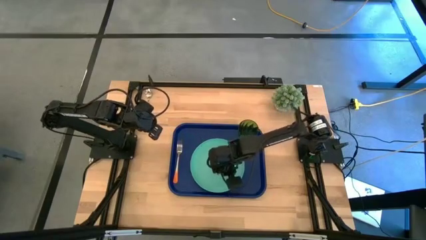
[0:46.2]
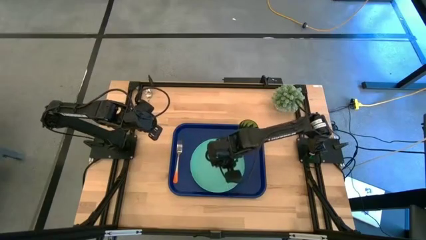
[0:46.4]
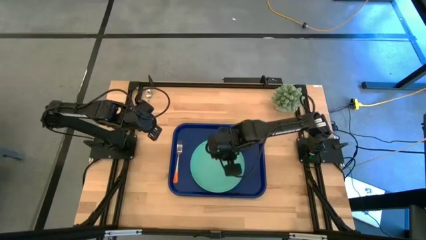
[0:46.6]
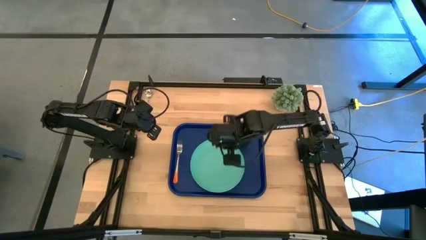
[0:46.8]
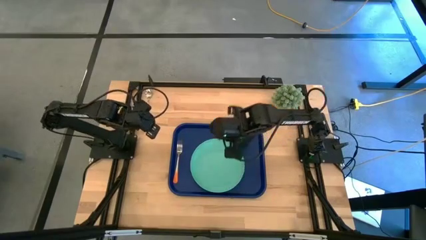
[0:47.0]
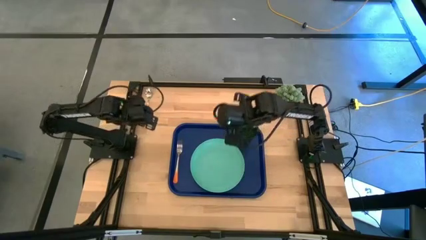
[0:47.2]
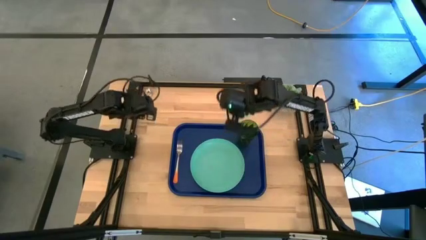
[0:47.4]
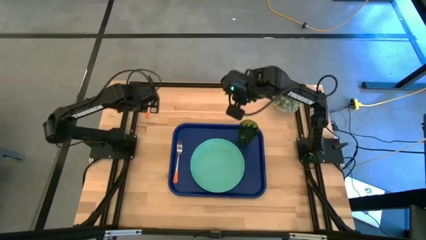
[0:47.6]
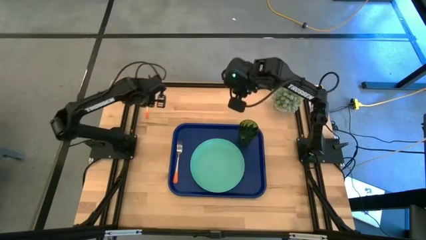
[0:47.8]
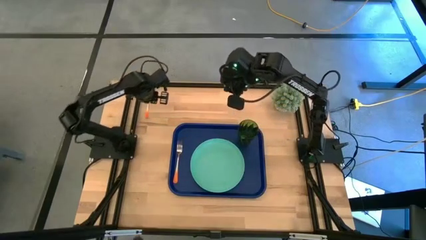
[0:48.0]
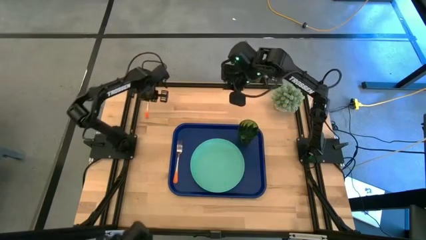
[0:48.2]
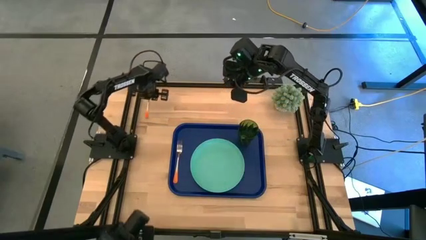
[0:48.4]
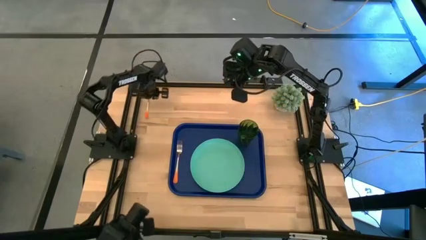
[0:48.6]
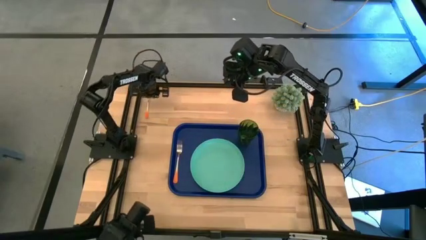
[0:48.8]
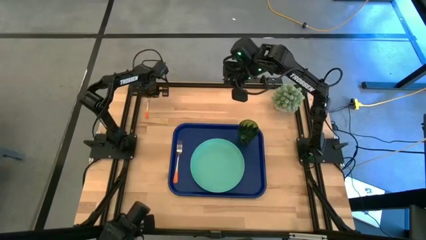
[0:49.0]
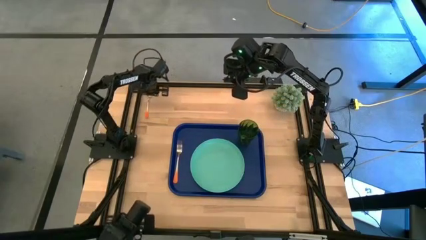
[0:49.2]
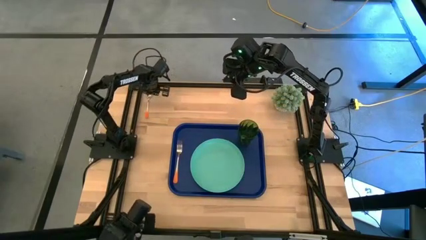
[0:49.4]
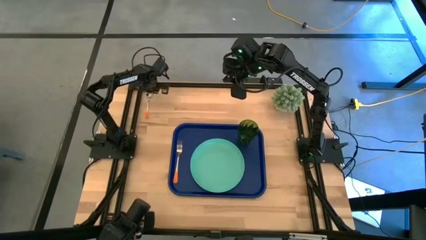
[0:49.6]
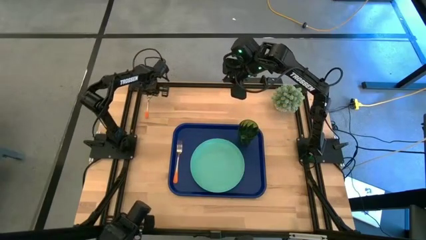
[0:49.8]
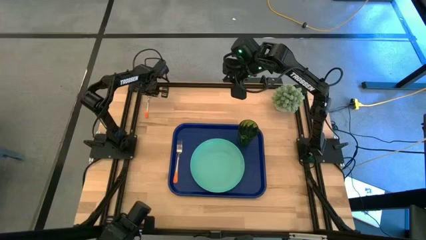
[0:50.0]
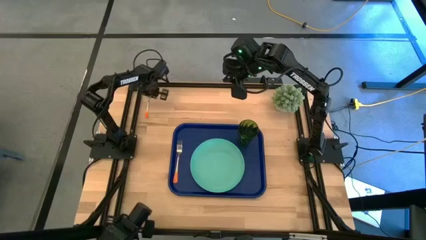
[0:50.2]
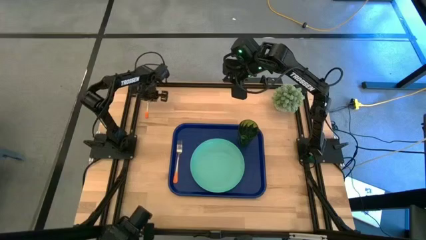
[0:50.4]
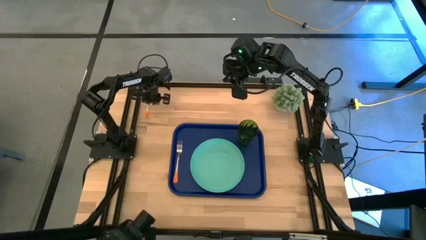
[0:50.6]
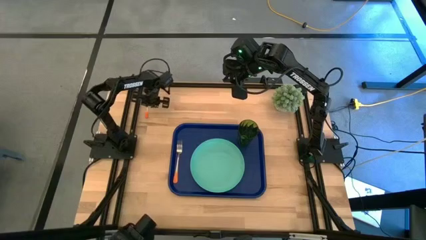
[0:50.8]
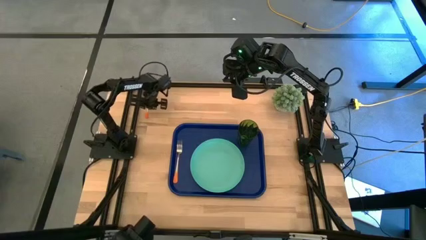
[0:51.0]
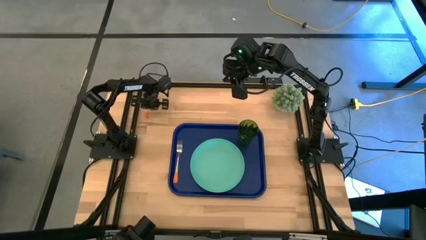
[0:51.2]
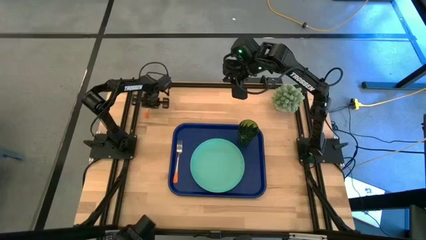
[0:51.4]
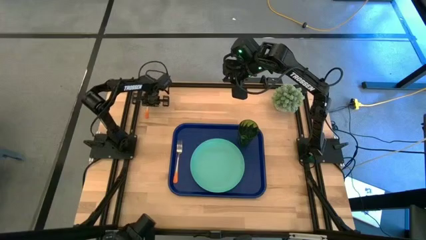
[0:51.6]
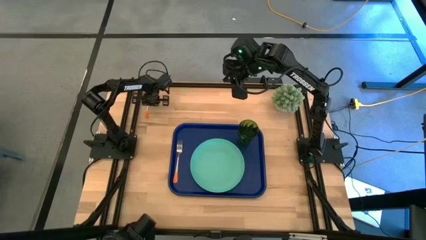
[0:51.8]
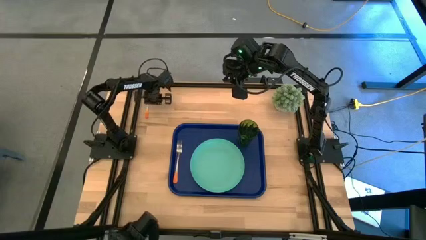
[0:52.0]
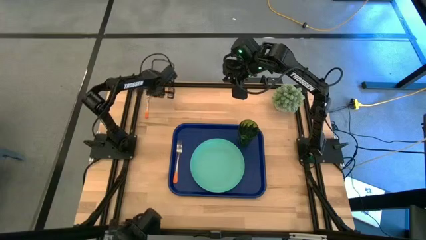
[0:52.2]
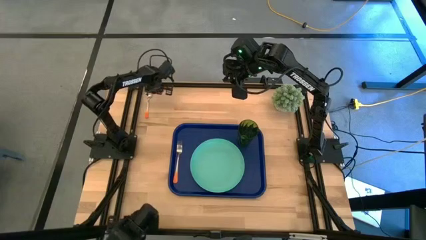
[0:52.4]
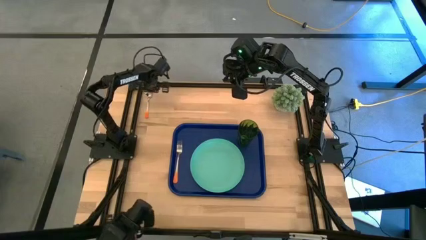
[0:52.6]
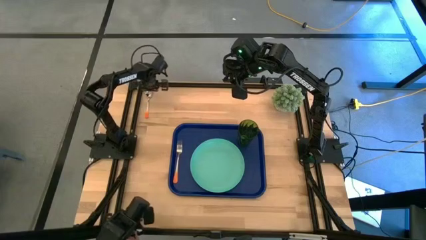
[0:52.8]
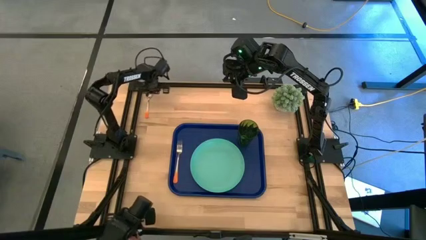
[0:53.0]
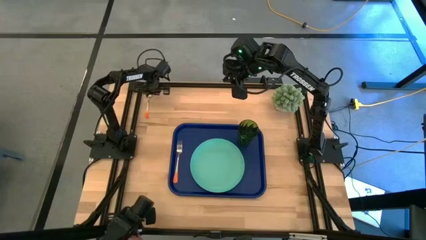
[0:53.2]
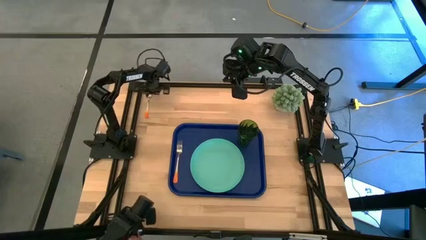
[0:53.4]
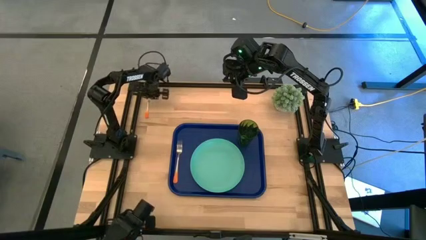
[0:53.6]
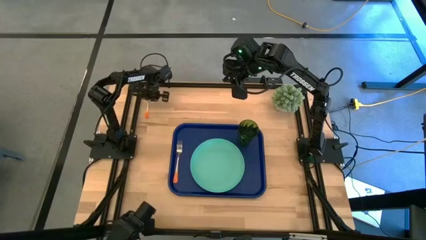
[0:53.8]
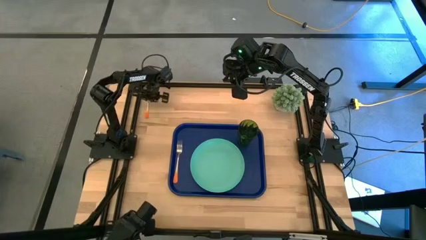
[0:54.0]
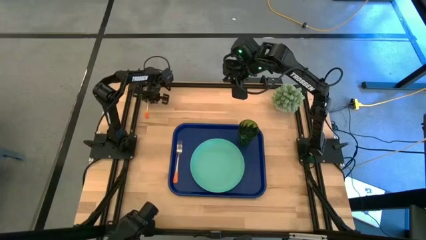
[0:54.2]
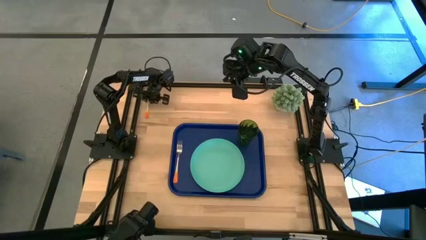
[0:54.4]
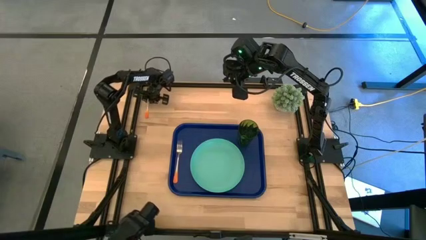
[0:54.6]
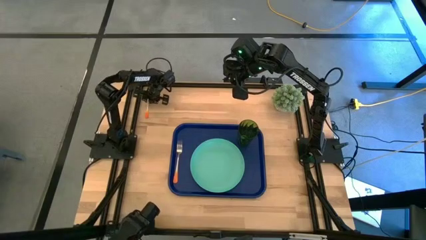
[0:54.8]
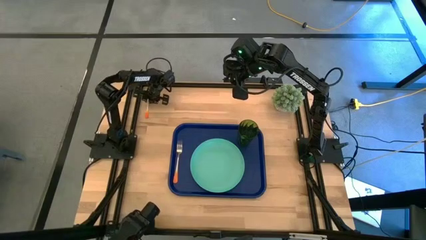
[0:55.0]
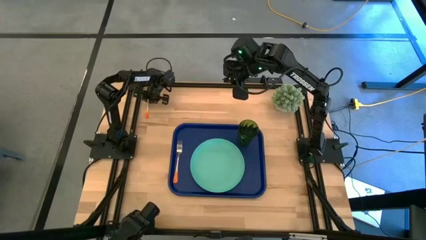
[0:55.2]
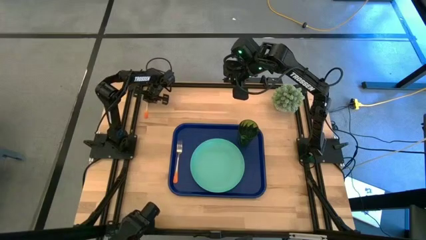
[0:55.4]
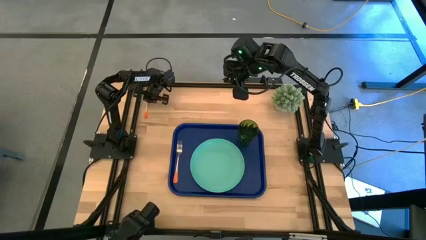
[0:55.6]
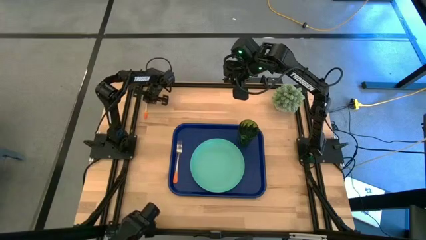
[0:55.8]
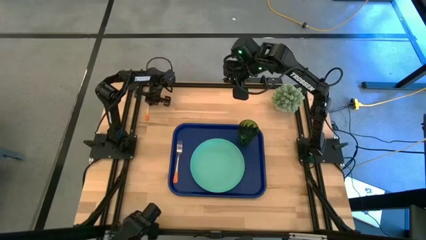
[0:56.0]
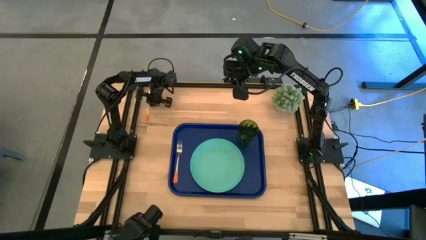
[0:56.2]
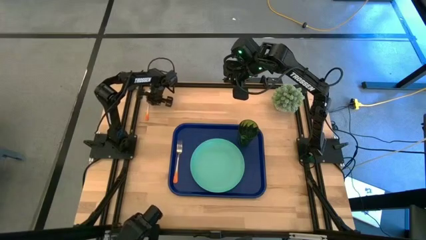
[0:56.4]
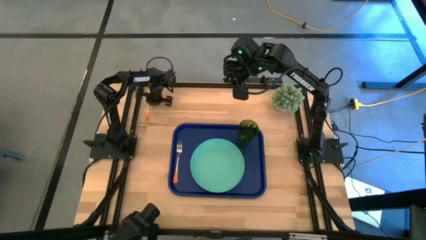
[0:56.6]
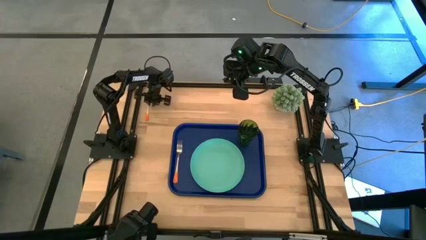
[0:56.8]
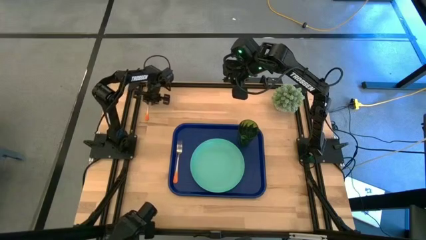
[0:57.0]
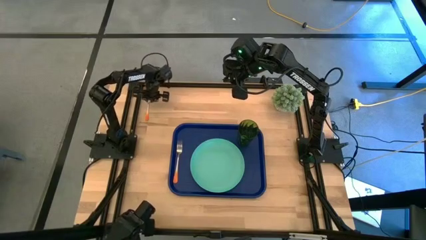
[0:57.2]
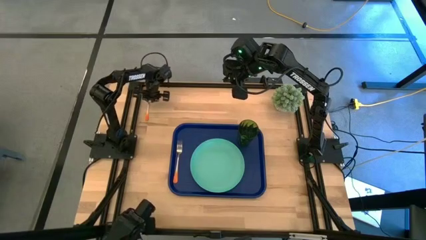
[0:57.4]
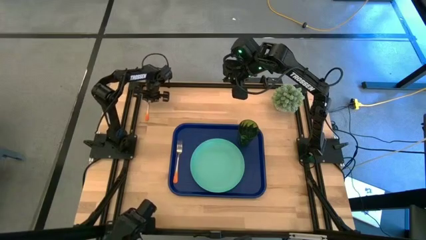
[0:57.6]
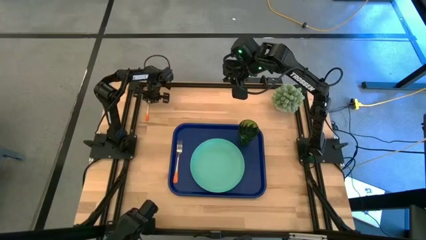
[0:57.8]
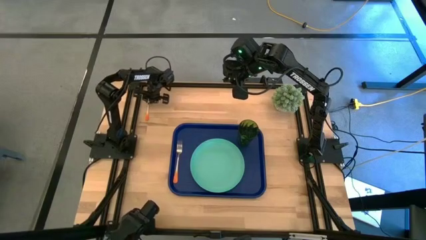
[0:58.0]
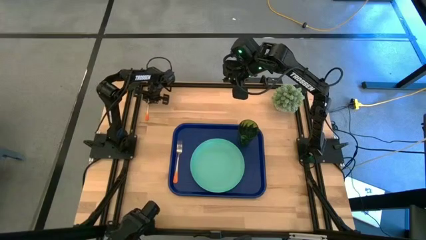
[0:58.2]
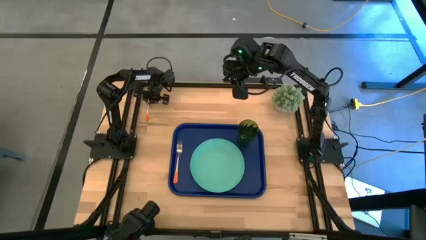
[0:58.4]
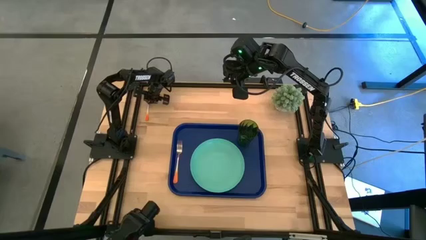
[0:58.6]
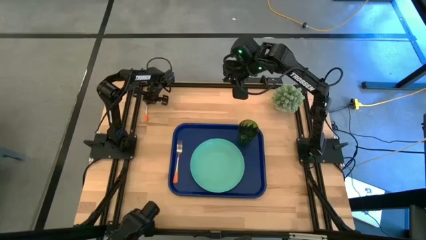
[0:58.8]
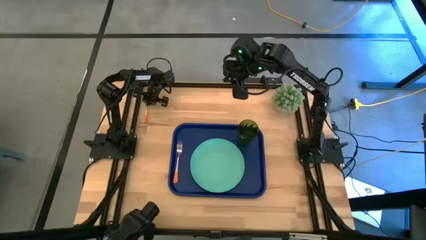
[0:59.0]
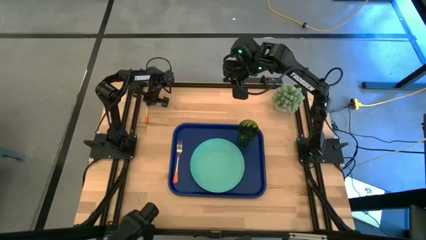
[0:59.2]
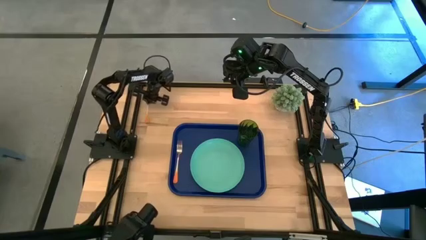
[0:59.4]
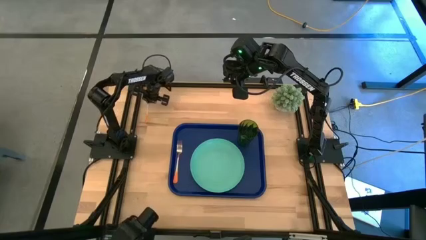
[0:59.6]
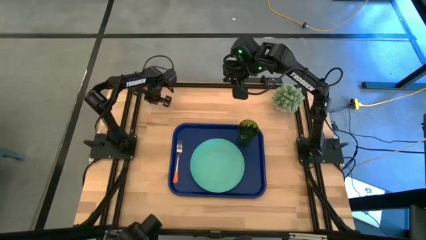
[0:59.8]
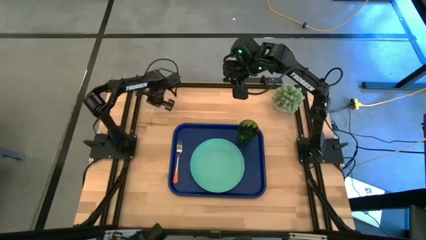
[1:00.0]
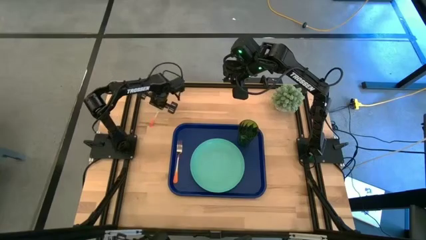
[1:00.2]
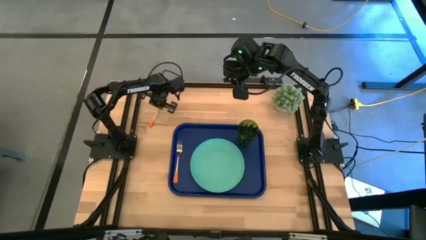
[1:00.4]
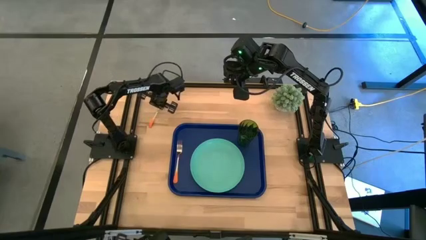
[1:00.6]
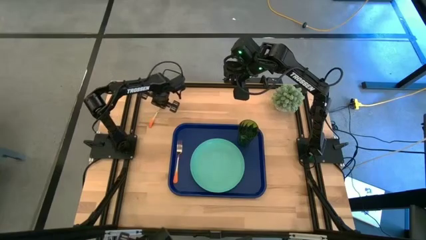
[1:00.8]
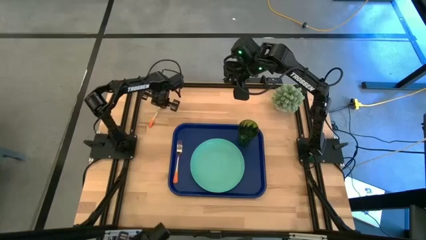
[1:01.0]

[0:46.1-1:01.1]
Task: Pick and place plate/cup/fork/spoon on tray
Put the orange spoon on the blue tray

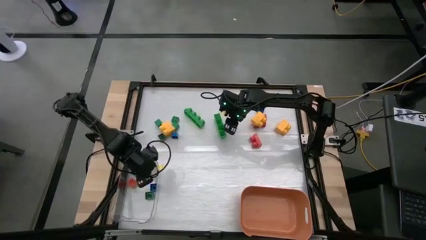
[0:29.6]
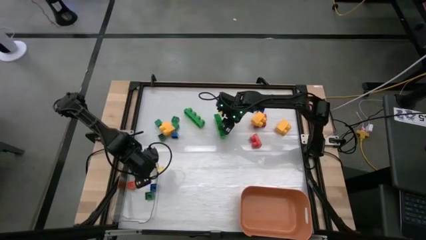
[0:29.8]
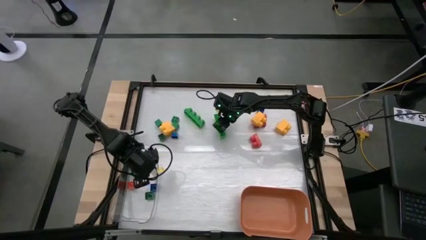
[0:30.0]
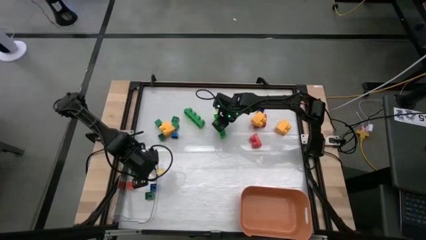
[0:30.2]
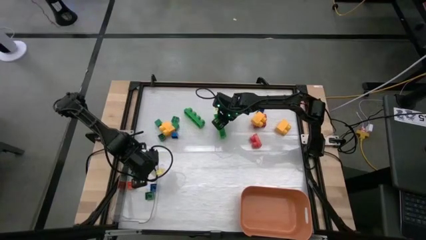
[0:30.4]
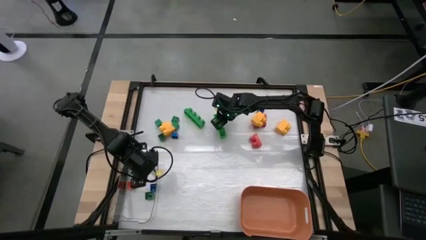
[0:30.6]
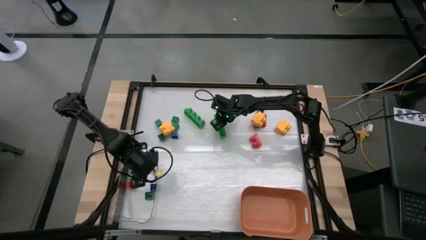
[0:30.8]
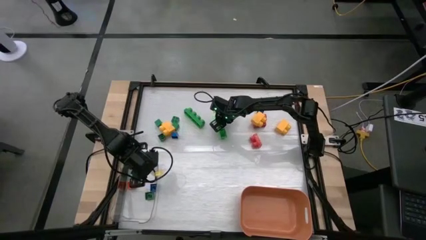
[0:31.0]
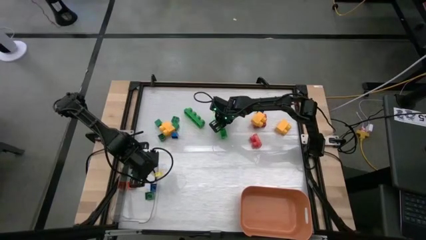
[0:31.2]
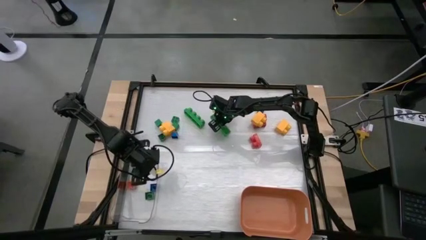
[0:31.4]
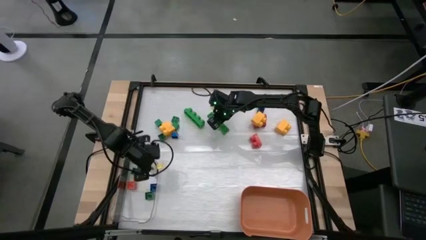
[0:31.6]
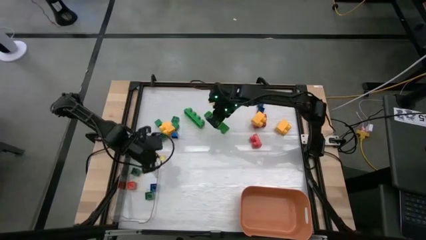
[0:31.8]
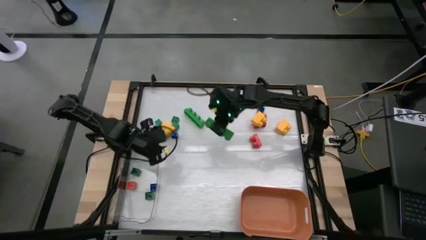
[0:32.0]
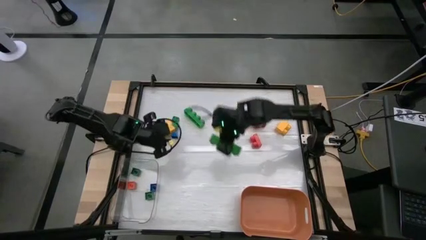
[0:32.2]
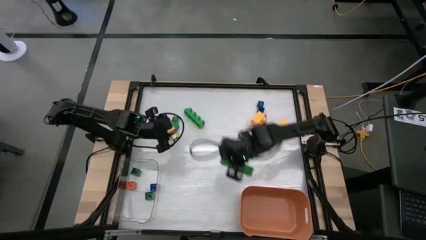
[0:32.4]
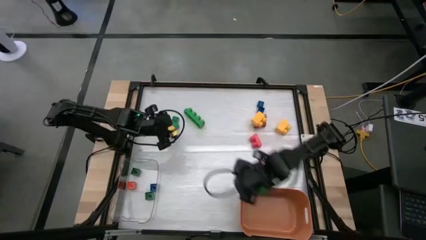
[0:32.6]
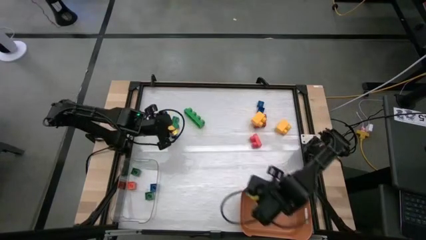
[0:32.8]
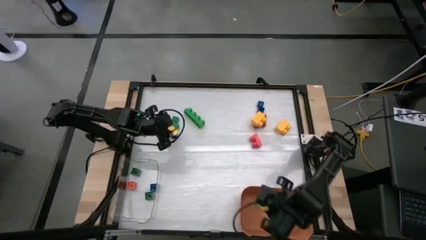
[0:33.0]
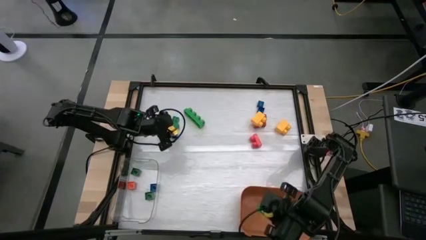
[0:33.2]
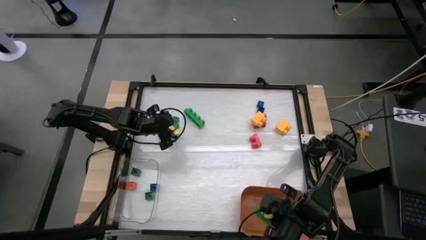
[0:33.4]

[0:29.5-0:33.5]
Task: Sort blocks by size
Put the big green game piece into the orange bin
